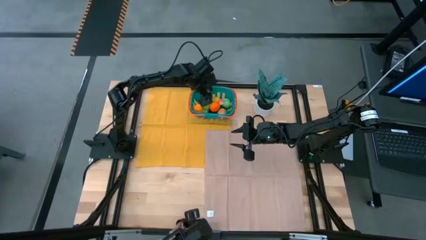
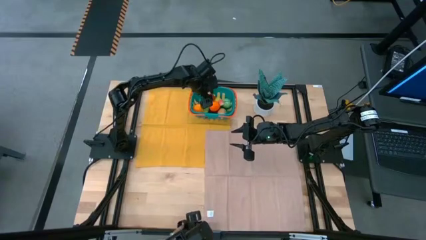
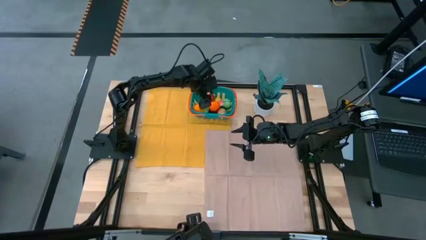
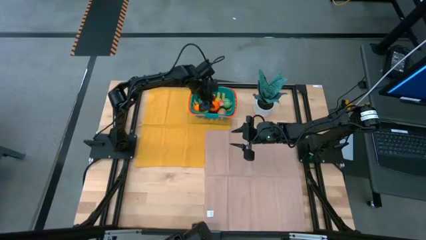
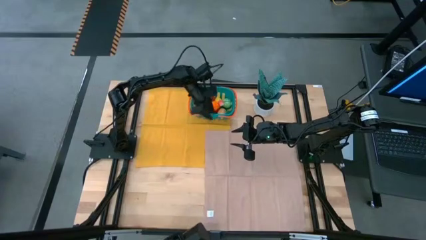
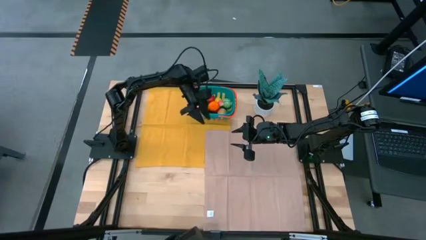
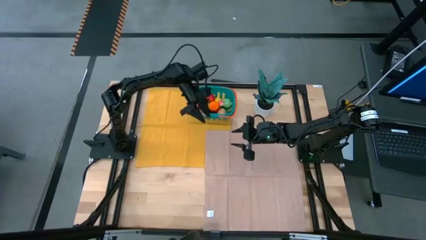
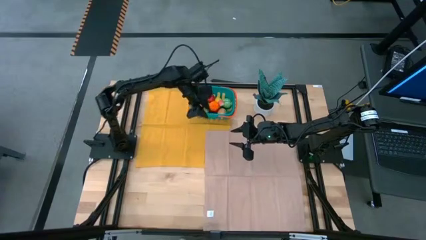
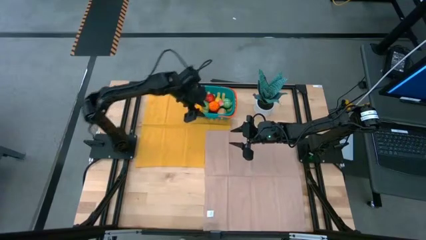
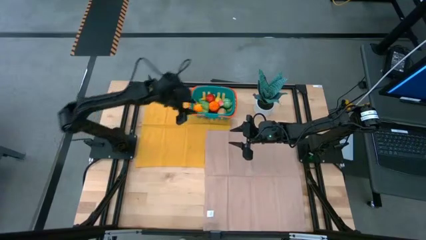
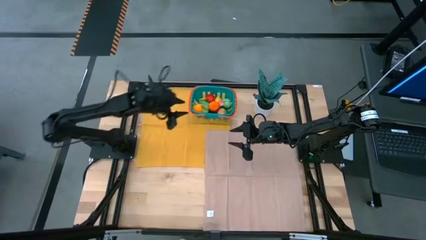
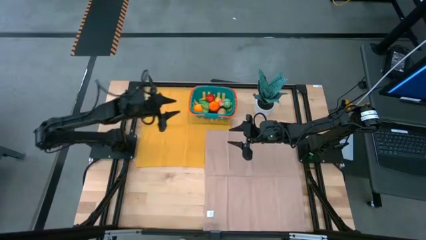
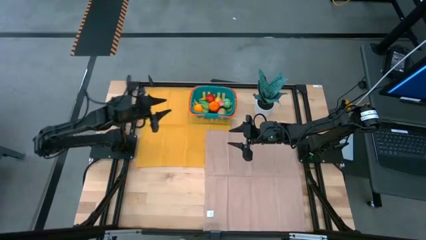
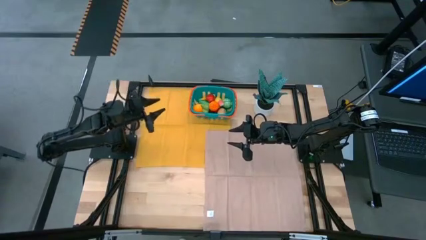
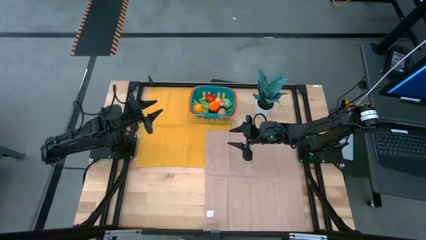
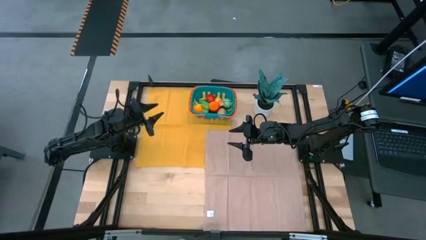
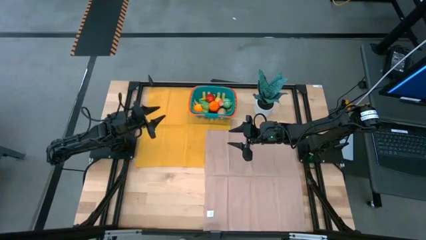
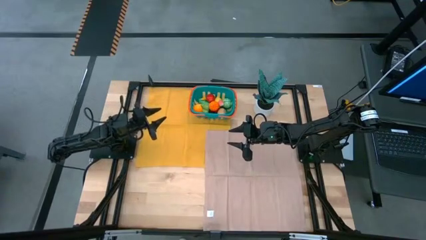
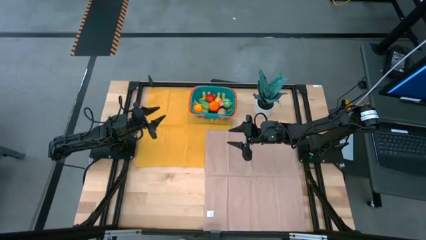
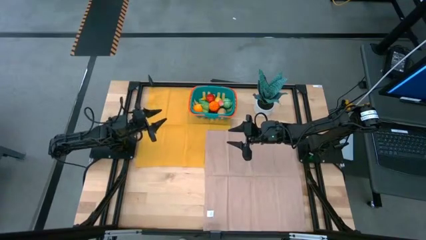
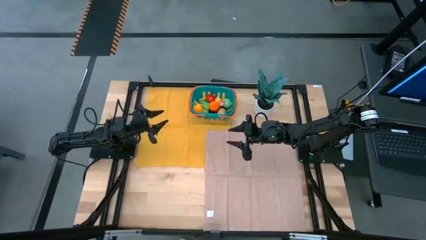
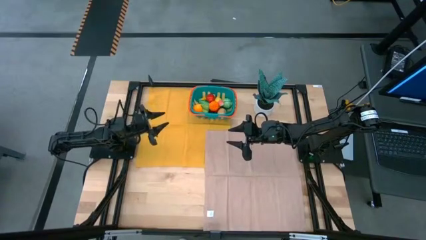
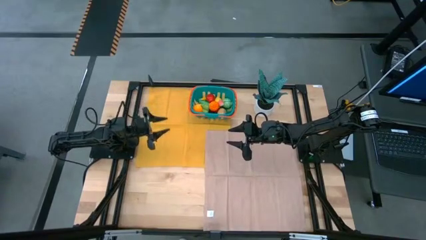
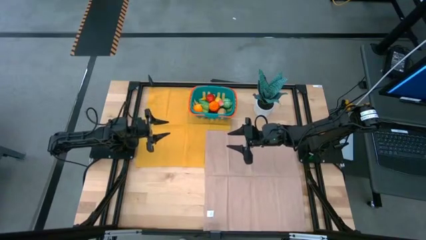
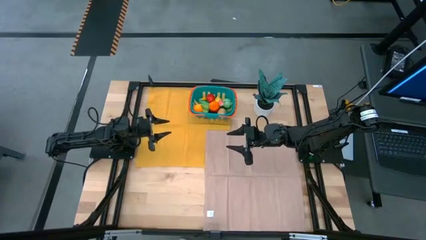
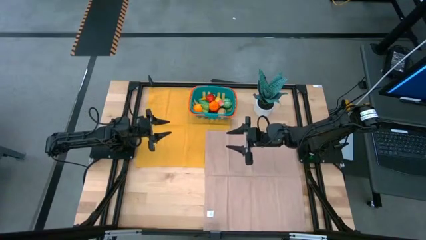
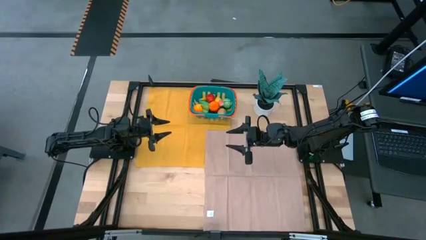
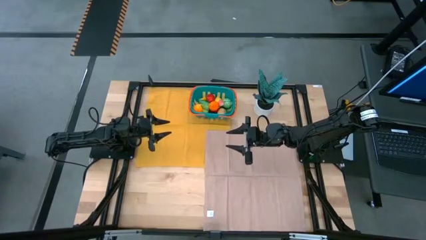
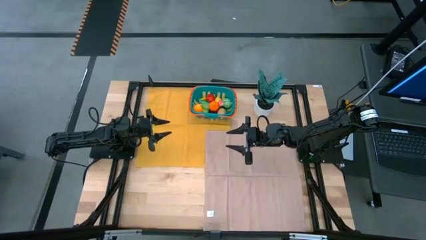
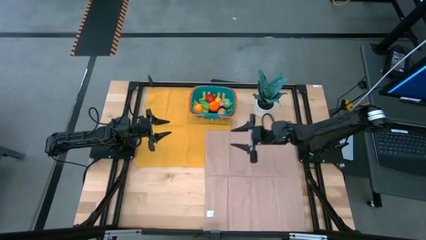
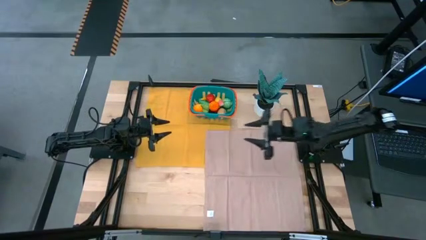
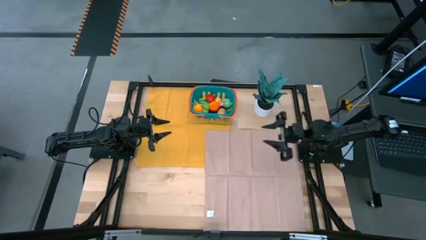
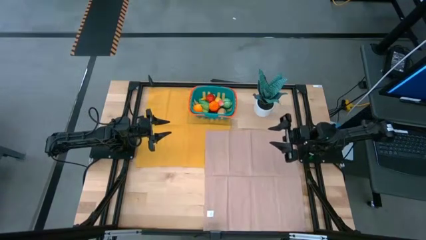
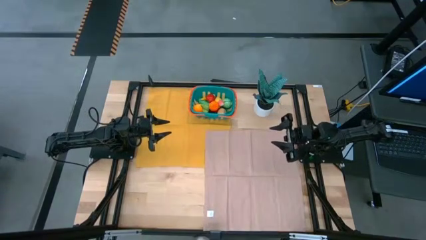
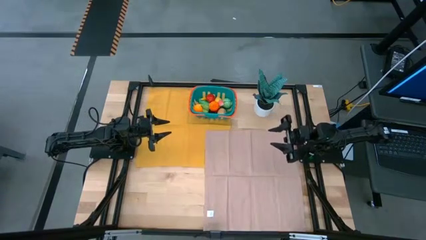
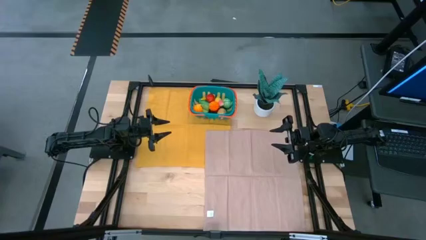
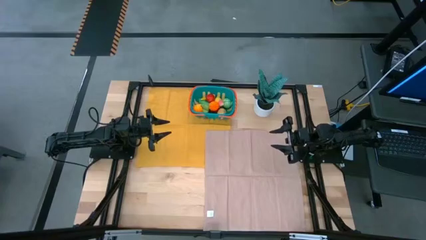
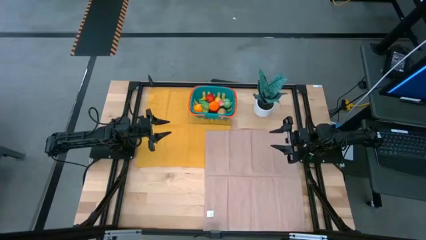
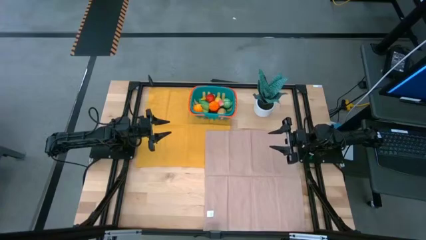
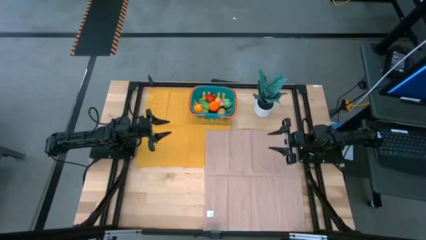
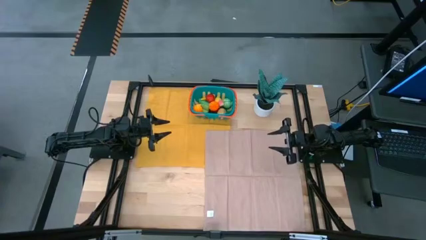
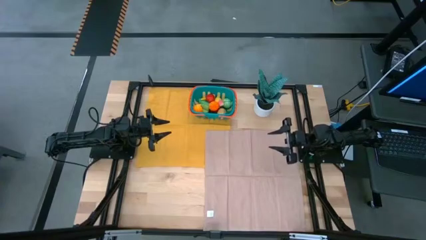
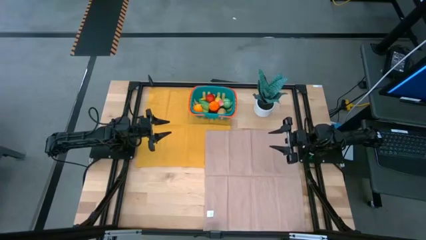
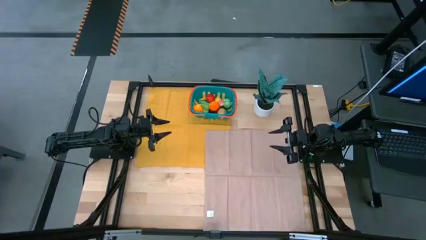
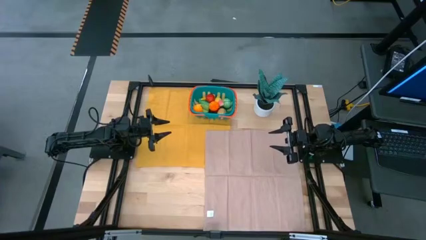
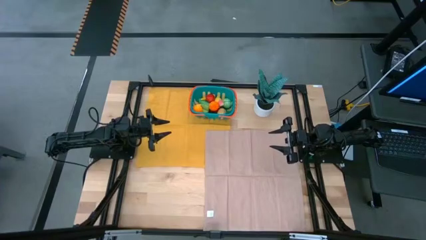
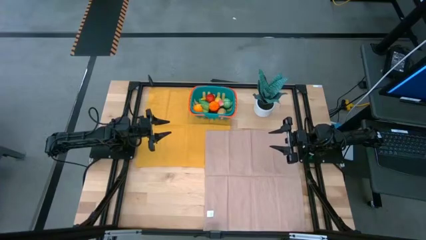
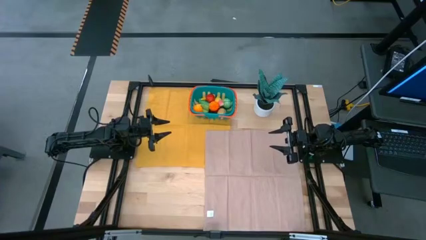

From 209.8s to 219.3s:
Task: Pick and placing Produce into tupperware
Return to Home Position

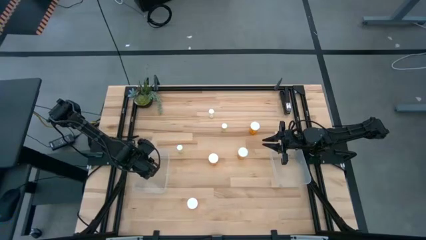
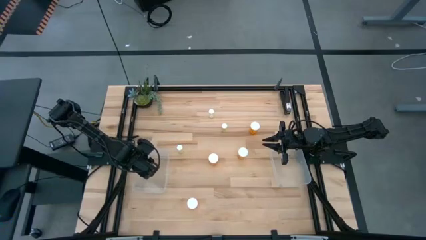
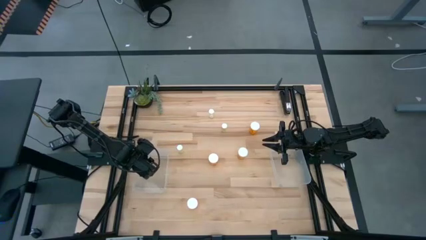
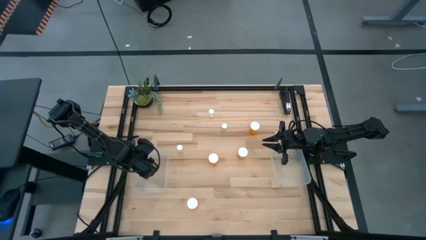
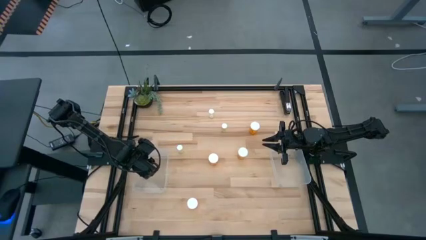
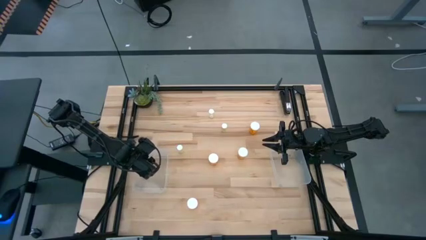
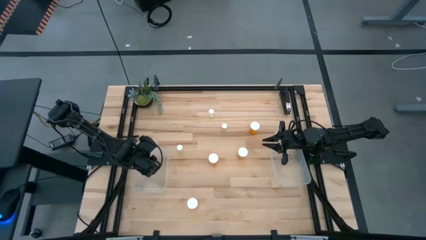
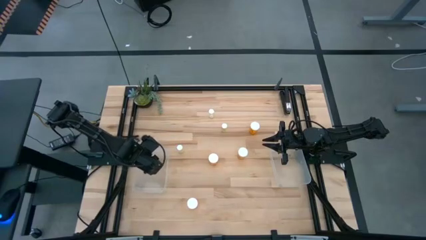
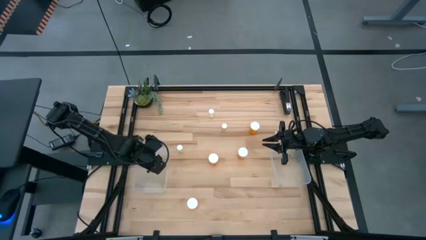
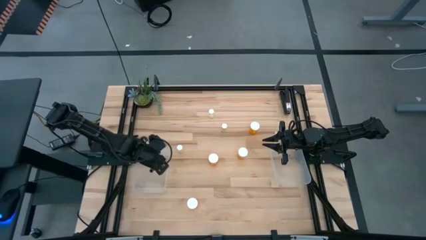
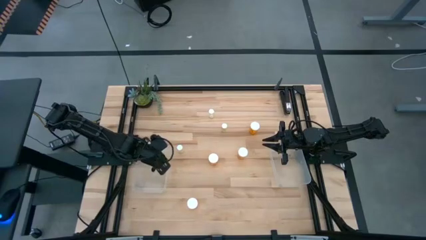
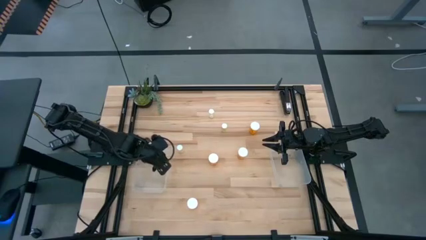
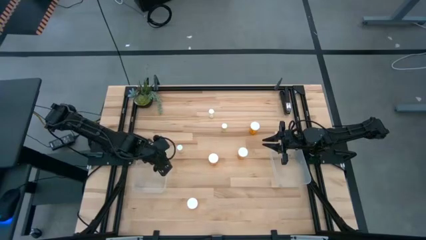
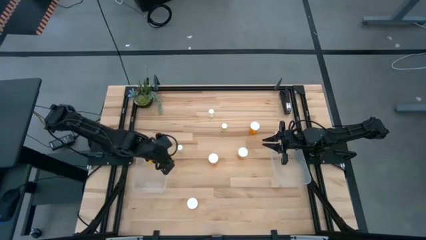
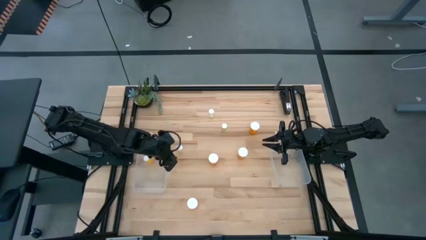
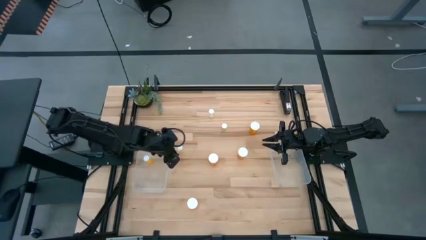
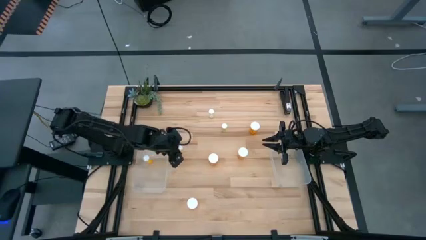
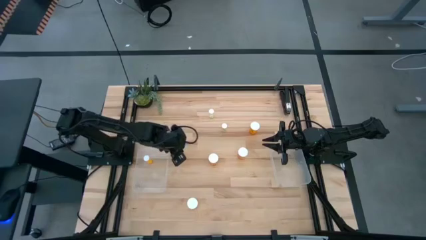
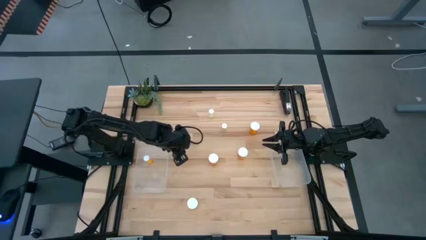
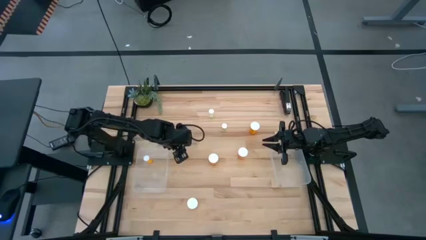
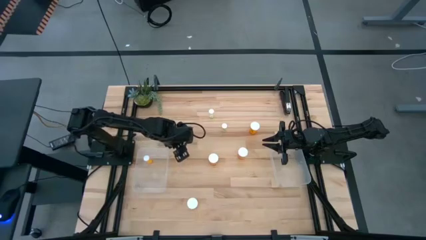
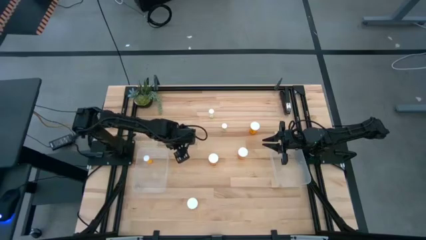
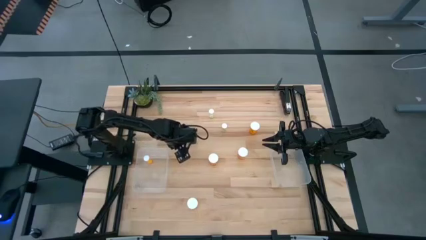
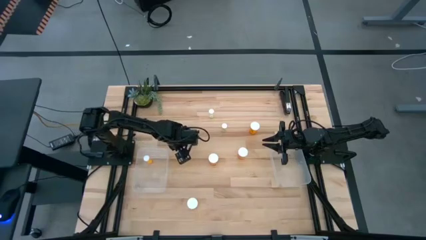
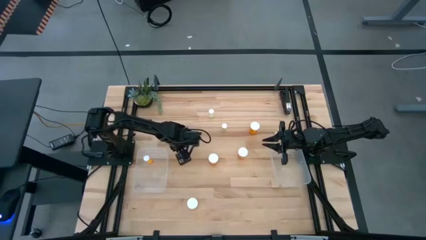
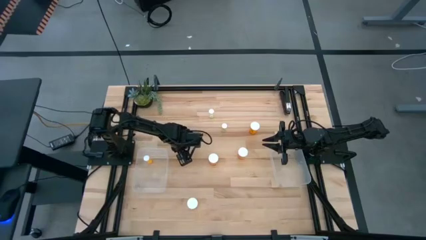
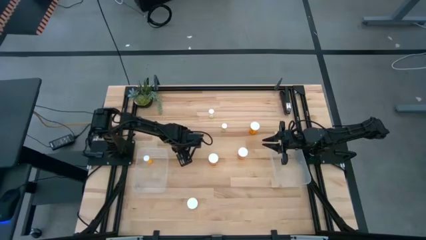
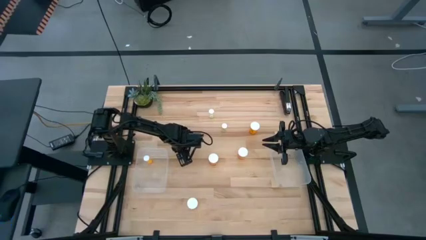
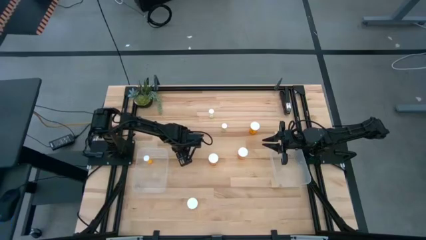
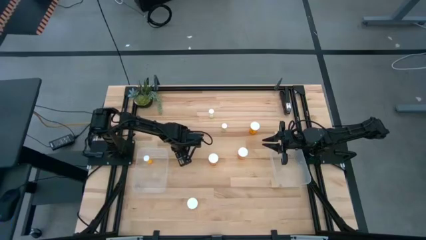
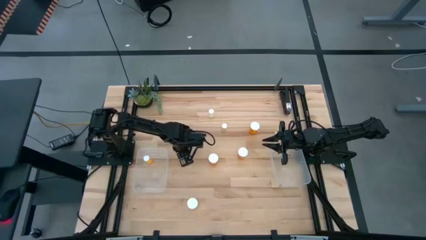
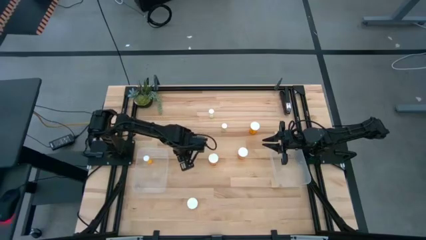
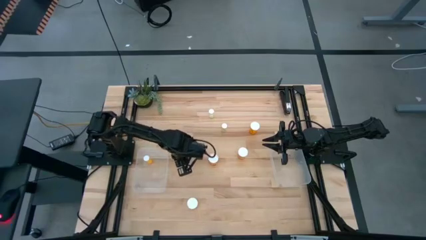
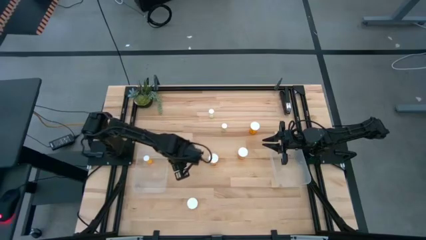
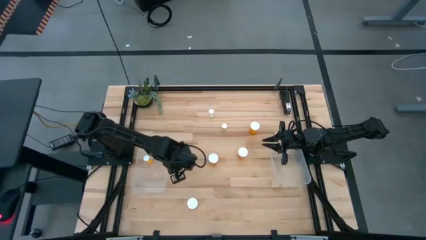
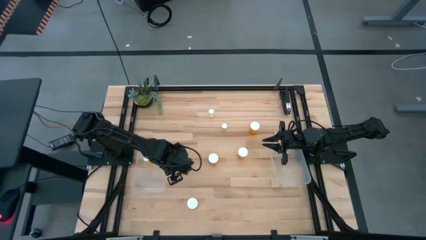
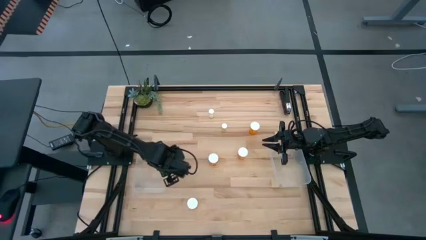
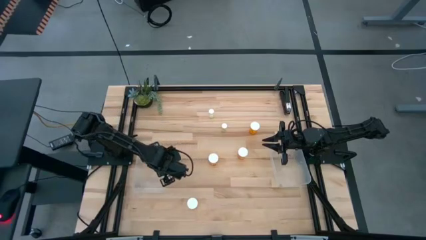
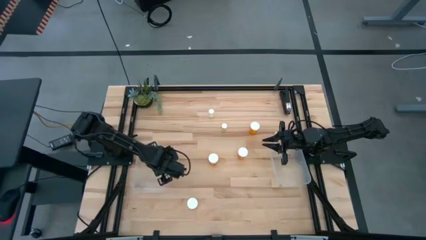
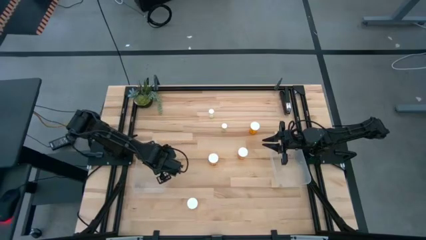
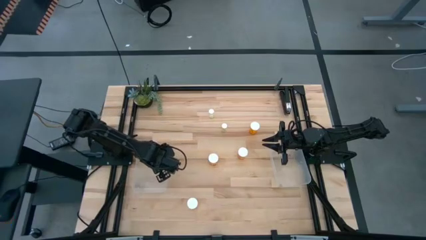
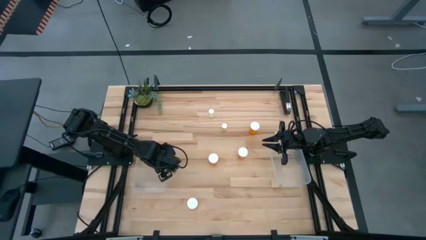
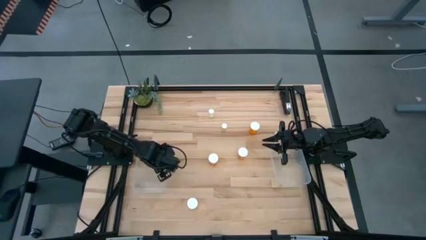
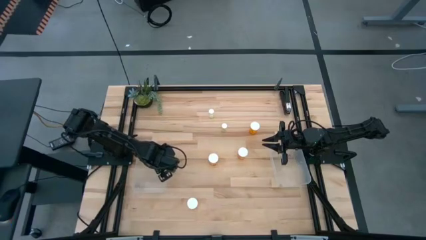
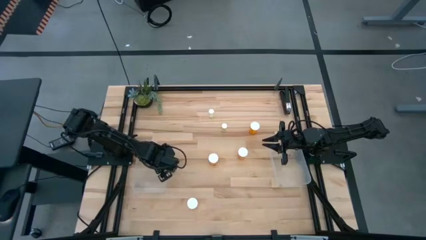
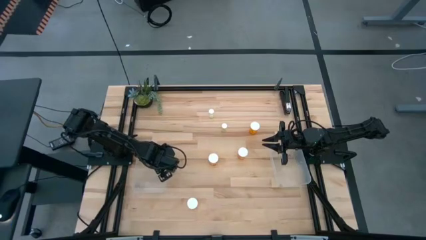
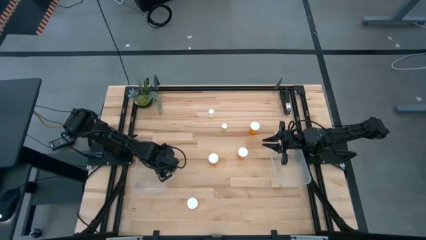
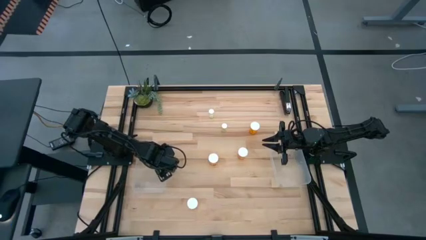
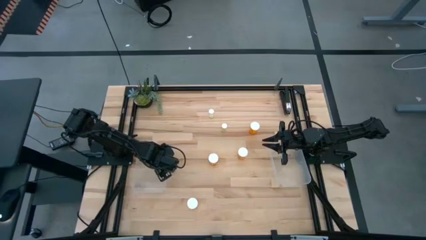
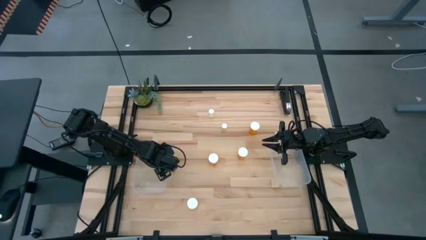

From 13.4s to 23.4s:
Task: Pick and place medicine bottles into bin by pill shape (circle, oval)
Put the small bottom left light yellow pill bottle into the left transparent bin
